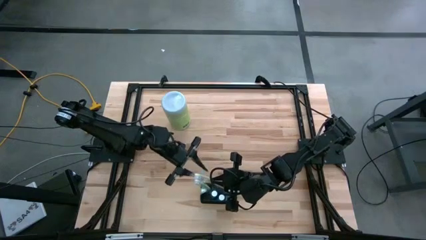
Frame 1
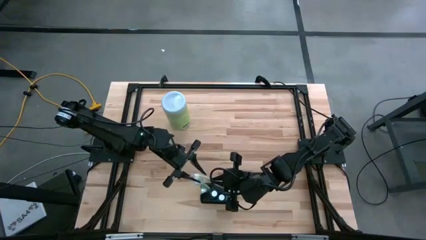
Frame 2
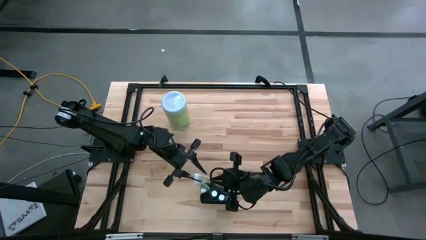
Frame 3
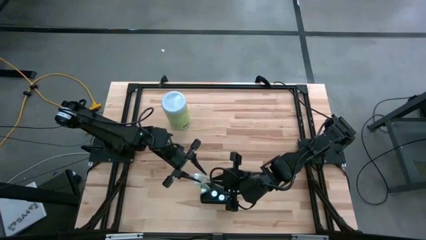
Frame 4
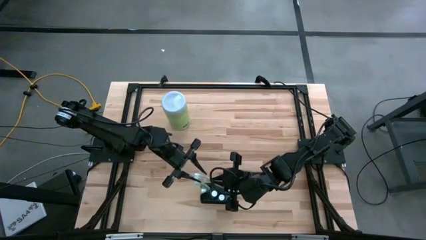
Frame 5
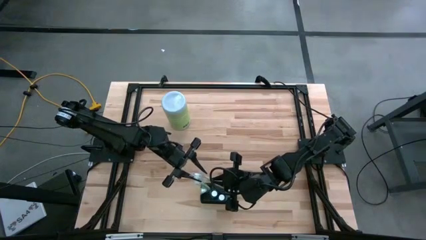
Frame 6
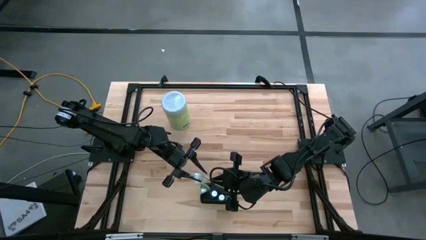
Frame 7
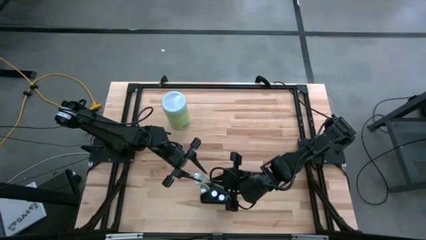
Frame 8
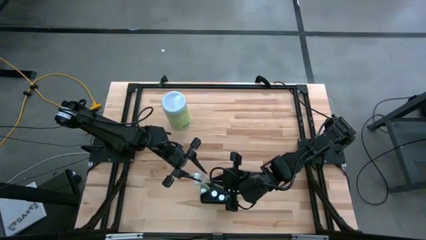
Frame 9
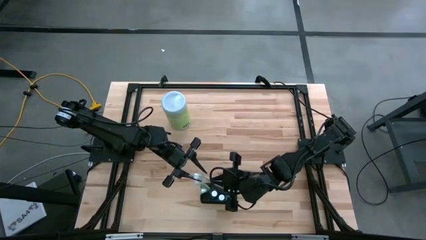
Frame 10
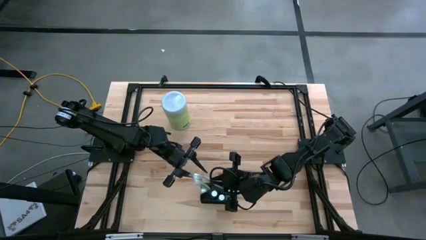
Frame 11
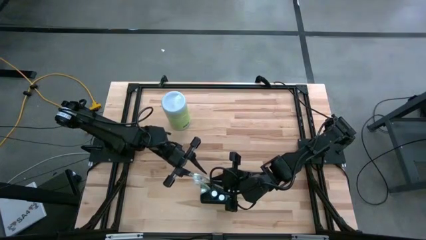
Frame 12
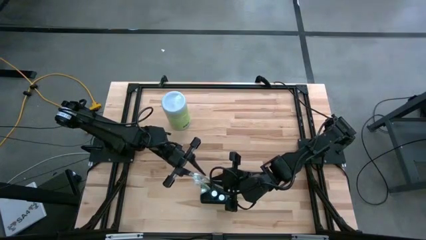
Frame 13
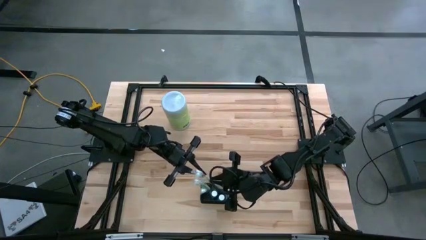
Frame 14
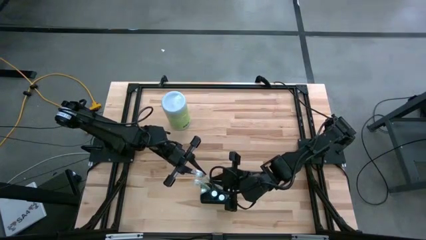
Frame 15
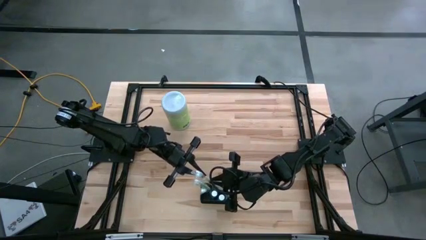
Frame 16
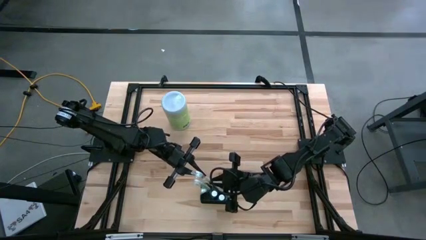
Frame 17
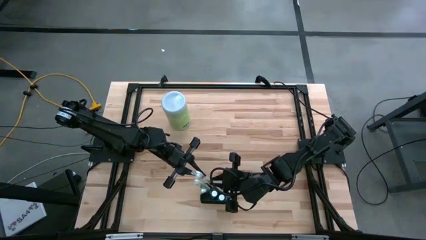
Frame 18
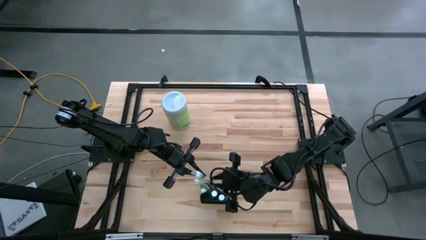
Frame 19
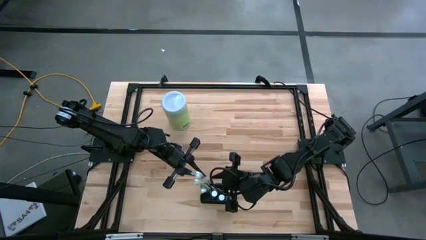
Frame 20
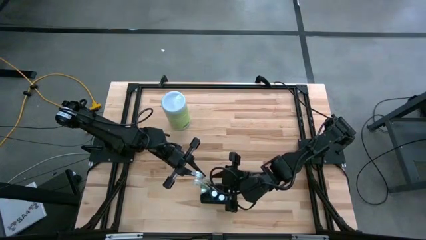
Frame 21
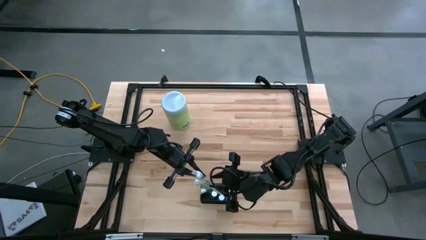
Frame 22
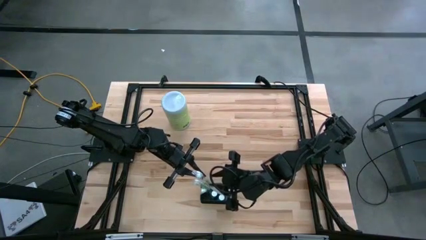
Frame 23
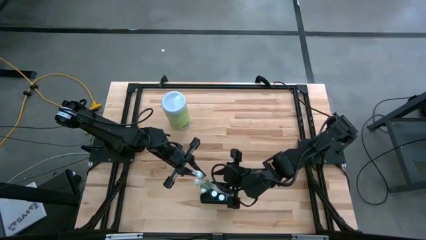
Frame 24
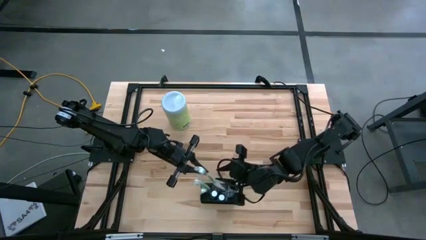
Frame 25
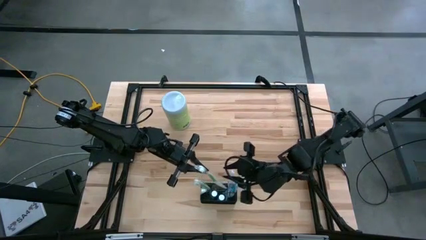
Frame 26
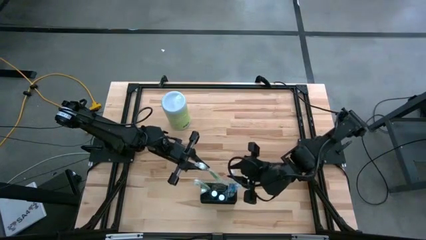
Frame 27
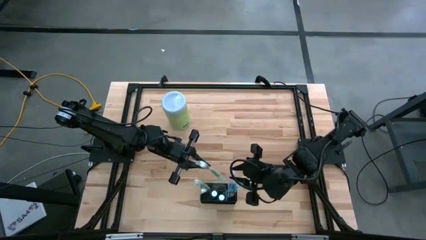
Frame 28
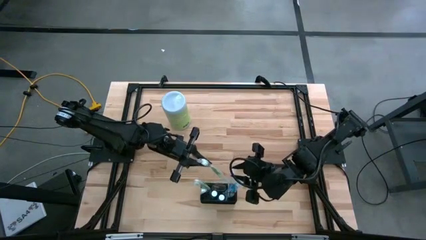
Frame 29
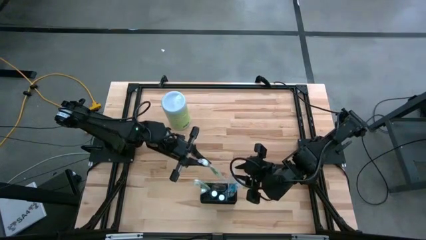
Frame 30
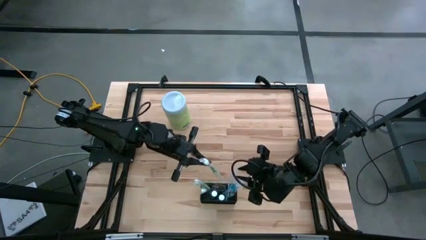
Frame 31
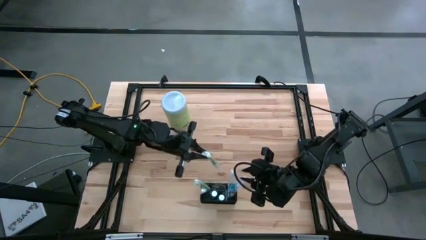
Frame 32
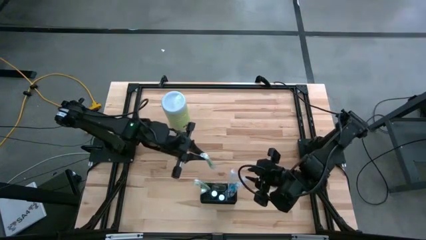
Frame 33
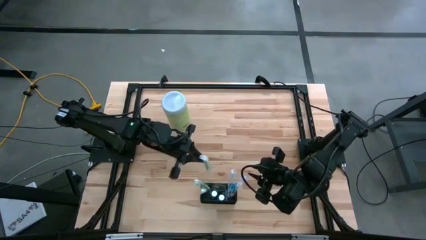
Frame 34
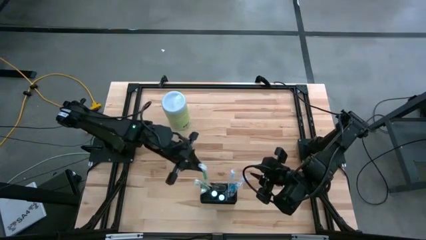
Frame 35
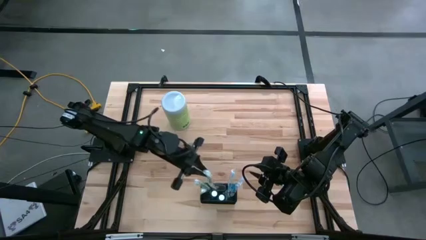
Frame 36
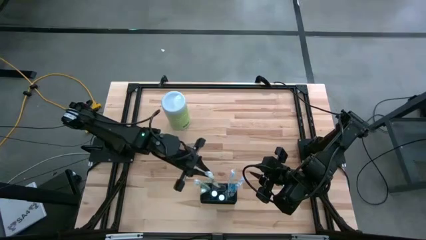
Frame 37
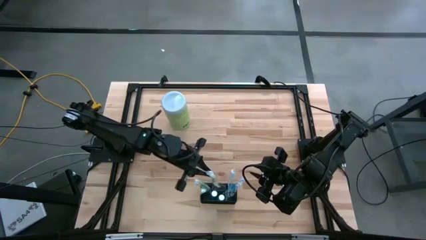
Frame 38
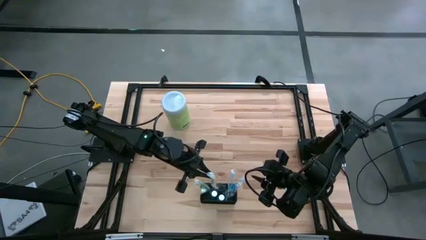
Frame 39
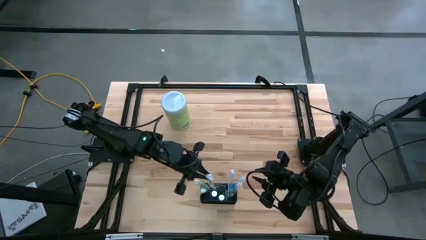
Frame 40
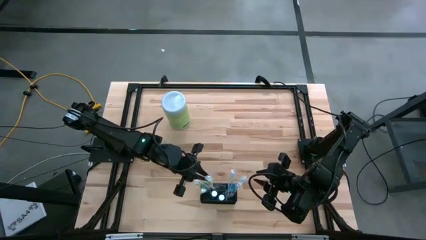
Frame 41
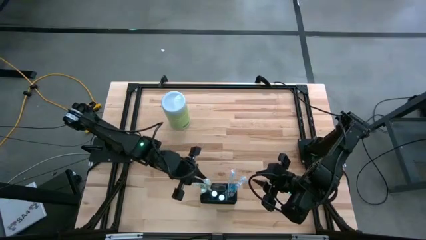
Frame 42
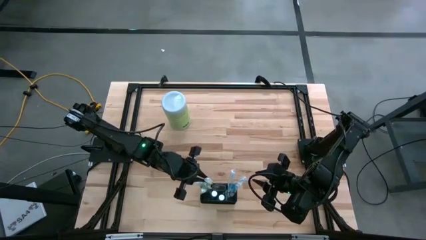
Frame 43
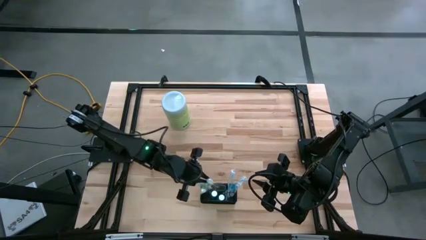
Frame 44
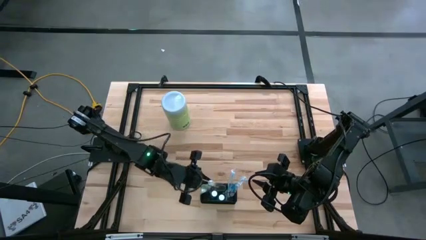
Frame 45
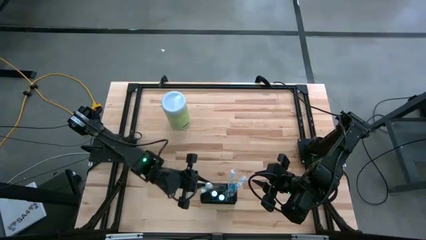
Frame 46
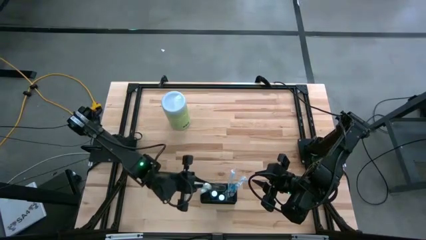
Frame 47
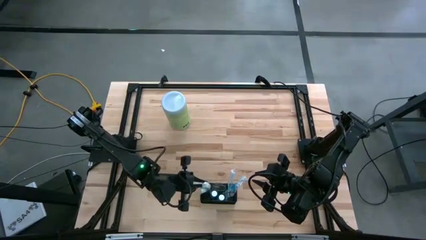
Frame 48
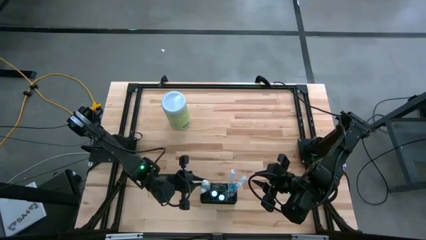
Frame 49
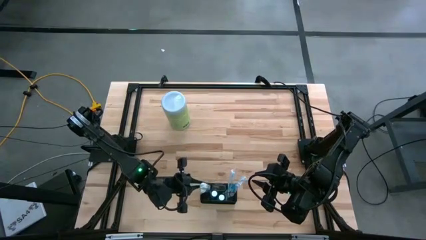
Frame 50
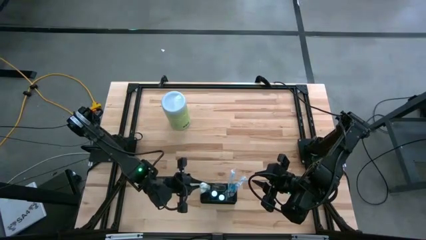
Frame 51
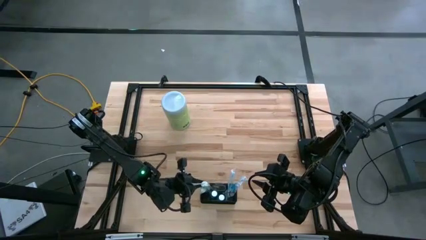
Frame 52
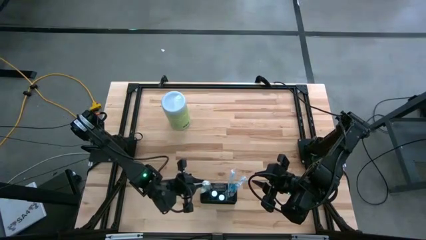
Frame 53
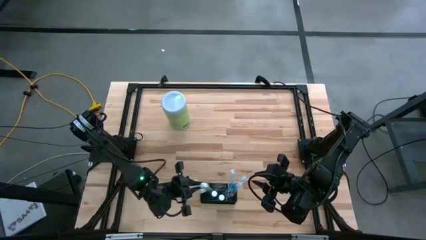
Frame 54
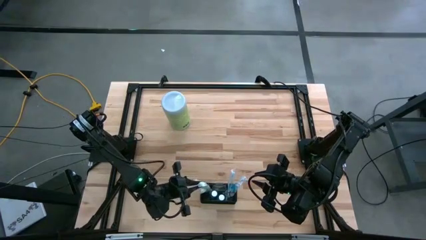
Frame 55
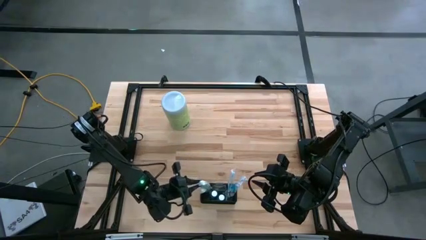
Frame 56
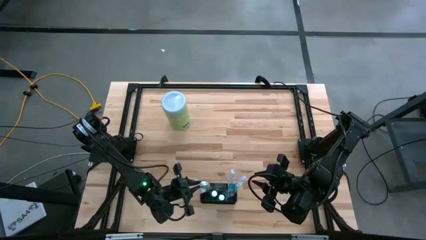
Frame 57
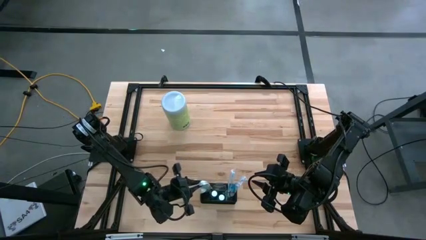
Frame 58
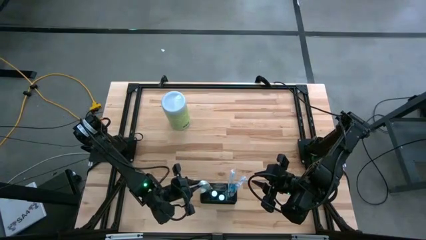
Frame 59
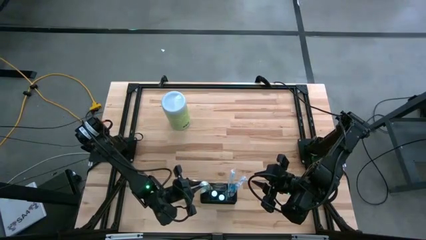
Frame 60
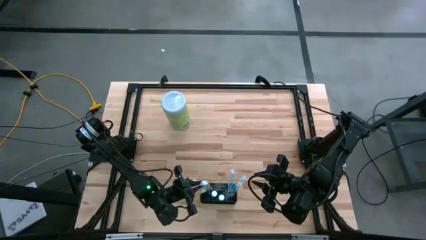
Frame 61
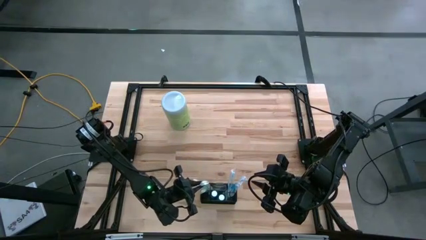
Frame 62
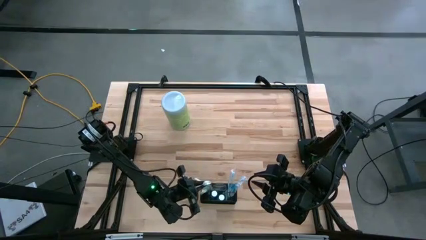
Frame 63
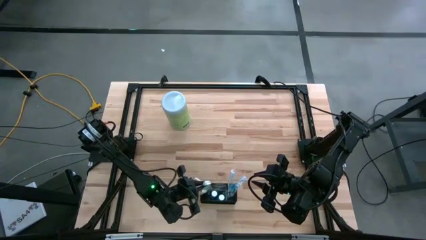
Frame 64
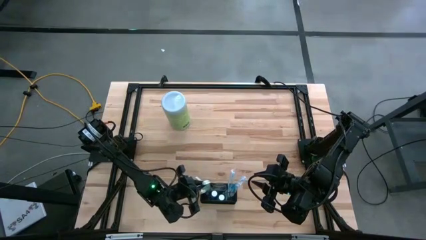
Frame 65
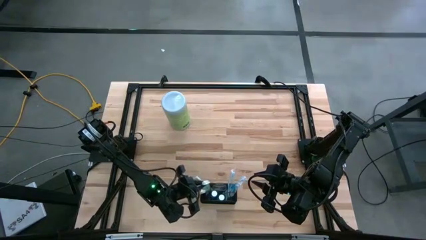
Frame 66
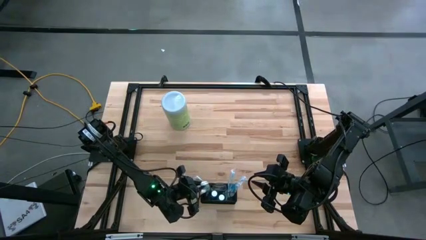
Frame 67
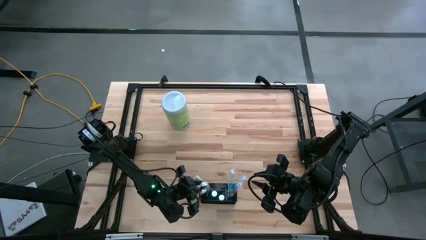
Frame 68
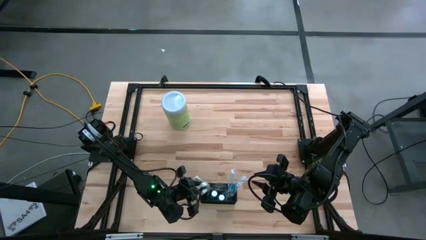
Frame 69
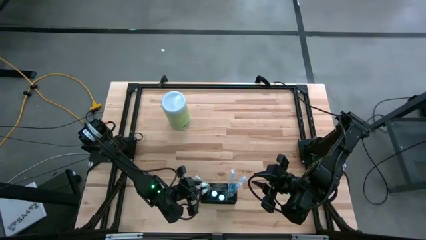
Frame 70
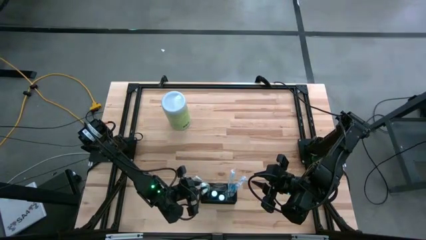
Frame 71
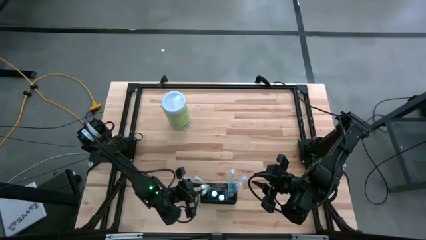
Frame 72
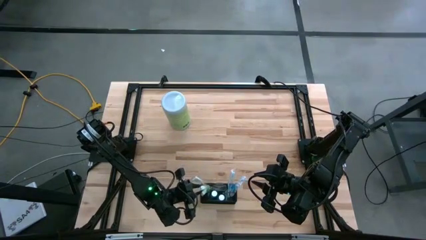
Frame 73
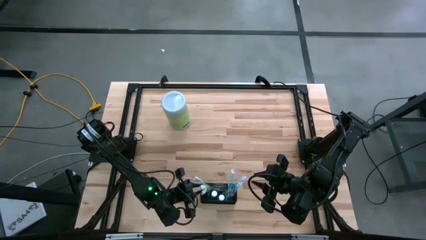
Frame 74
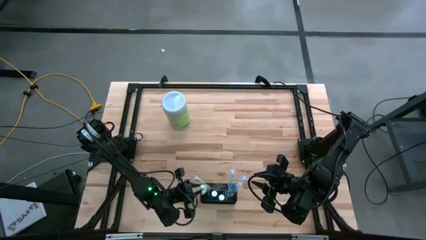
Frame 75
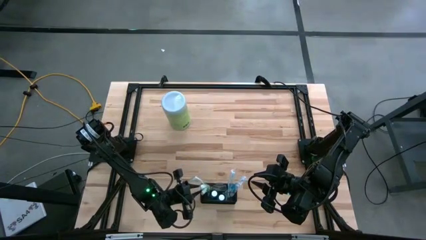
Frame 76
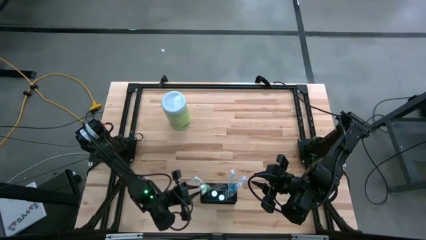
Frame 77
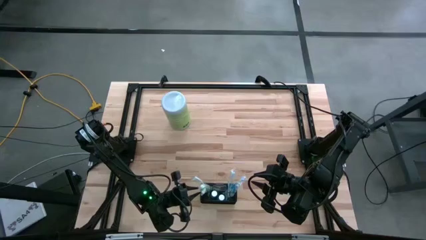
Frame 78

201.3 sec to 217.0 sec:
Task: Pick & Place toothbrushing station
Put the green toothbrush into the mesh organizer
